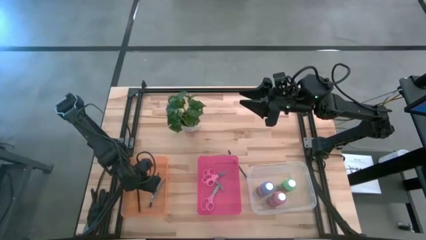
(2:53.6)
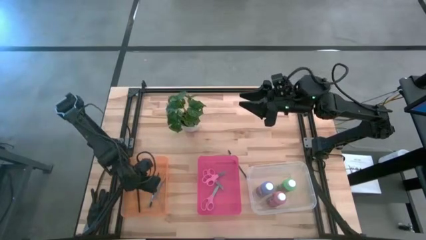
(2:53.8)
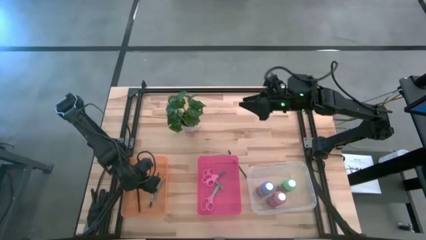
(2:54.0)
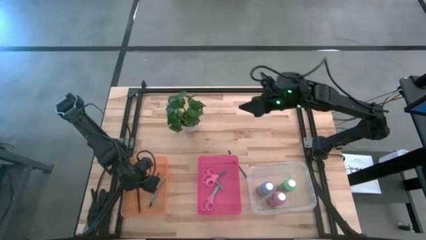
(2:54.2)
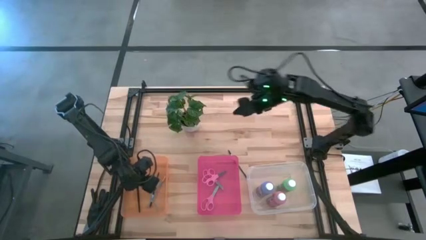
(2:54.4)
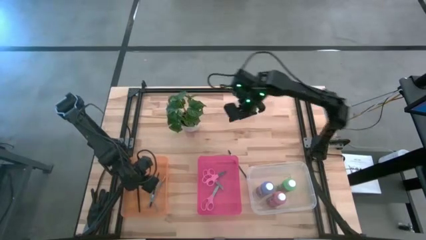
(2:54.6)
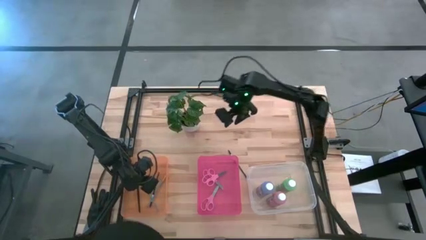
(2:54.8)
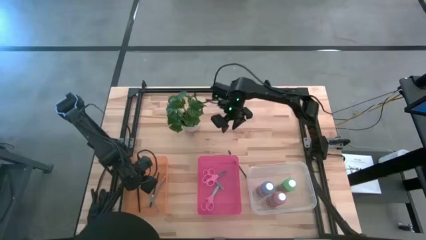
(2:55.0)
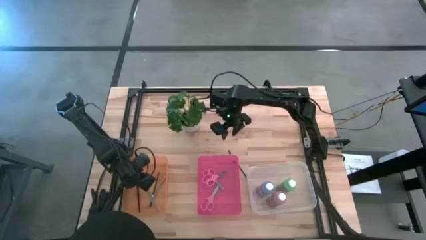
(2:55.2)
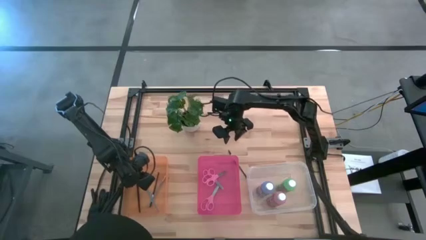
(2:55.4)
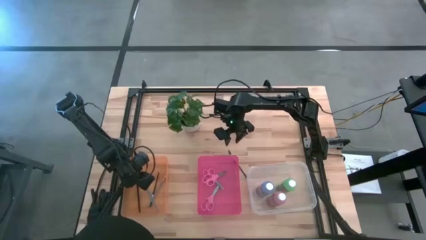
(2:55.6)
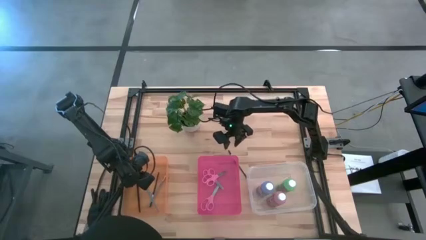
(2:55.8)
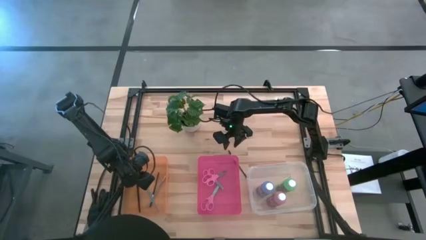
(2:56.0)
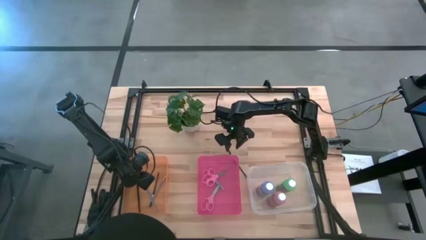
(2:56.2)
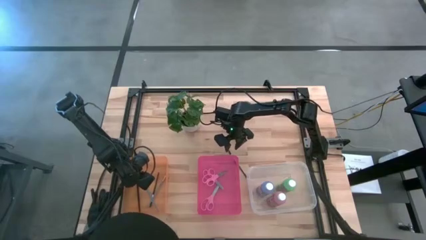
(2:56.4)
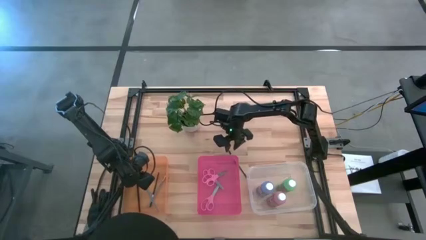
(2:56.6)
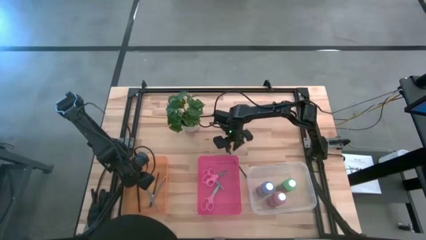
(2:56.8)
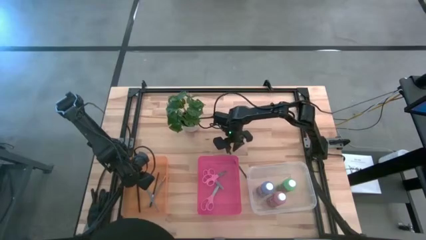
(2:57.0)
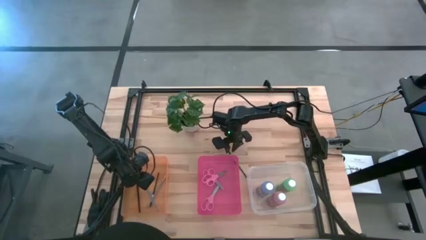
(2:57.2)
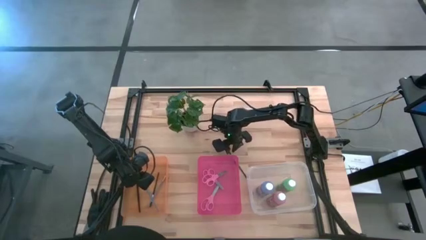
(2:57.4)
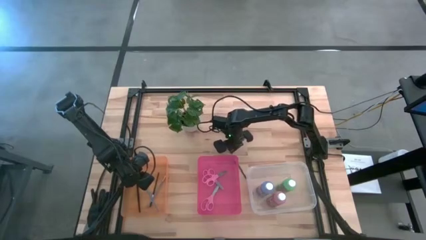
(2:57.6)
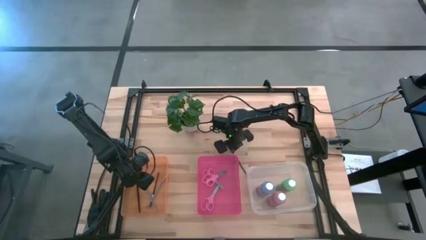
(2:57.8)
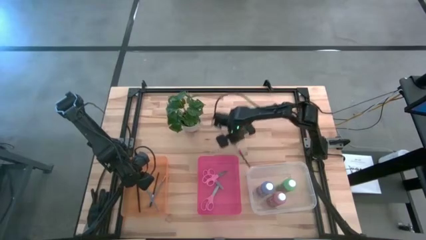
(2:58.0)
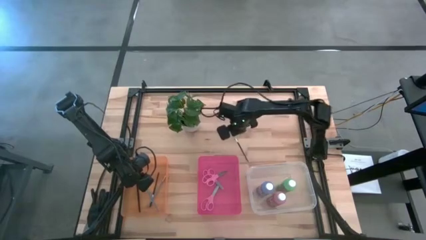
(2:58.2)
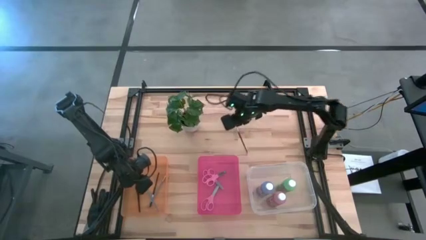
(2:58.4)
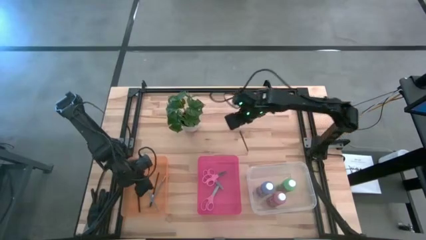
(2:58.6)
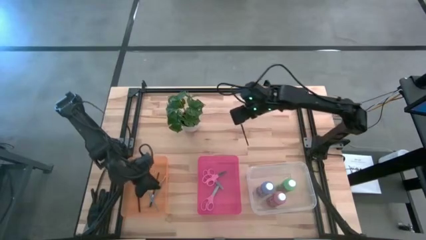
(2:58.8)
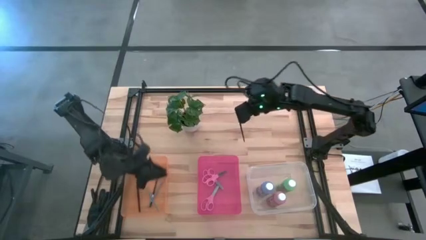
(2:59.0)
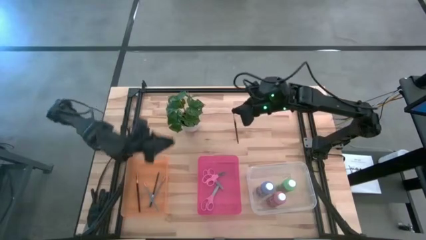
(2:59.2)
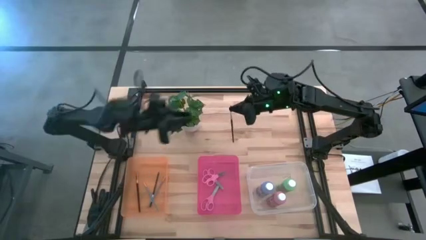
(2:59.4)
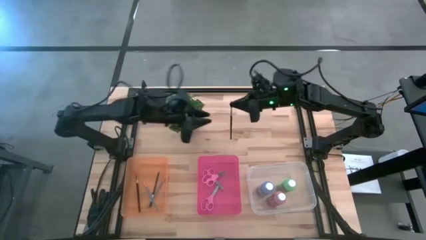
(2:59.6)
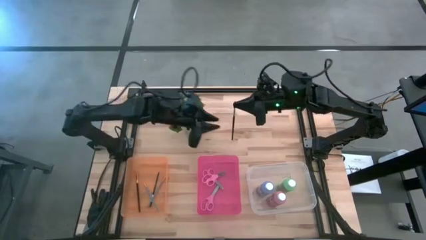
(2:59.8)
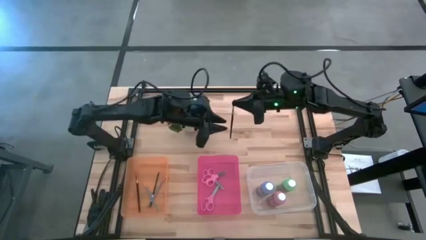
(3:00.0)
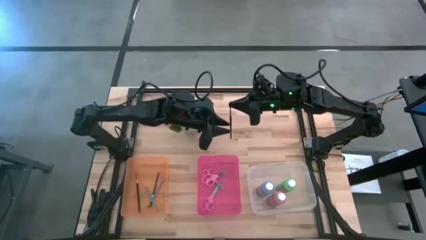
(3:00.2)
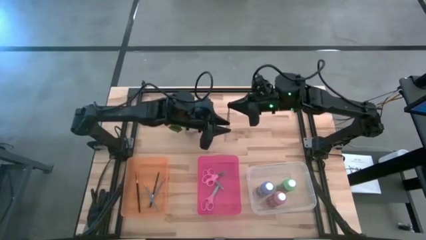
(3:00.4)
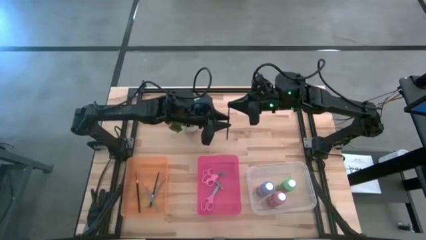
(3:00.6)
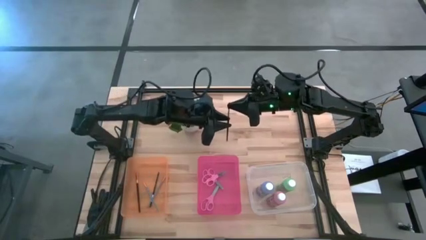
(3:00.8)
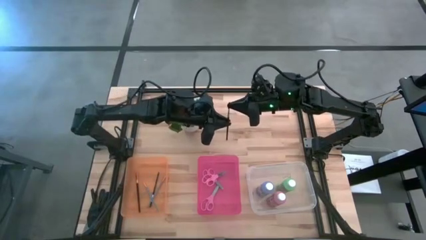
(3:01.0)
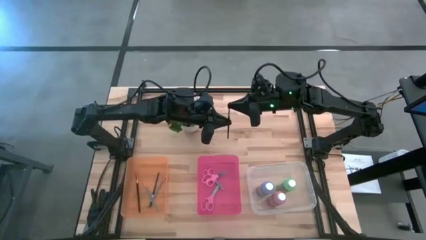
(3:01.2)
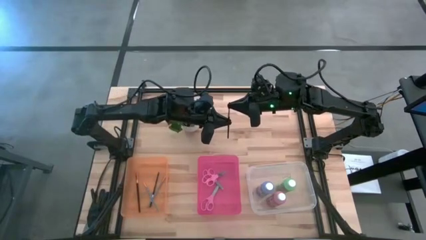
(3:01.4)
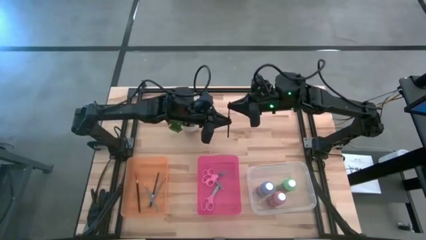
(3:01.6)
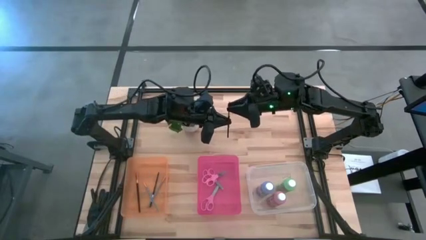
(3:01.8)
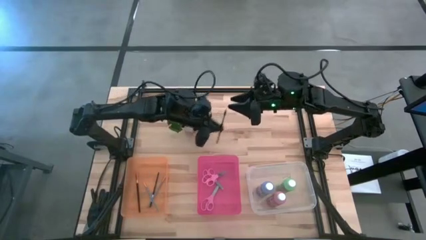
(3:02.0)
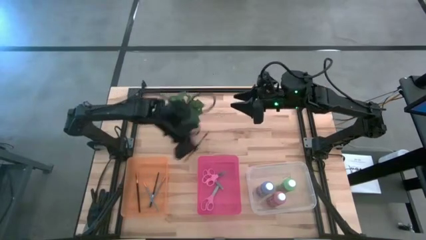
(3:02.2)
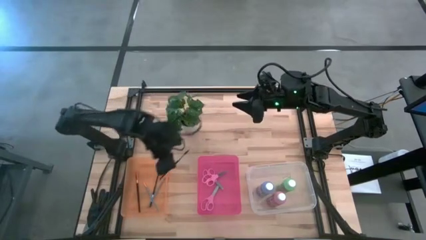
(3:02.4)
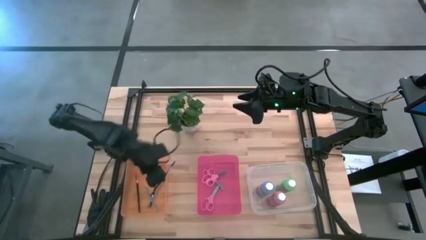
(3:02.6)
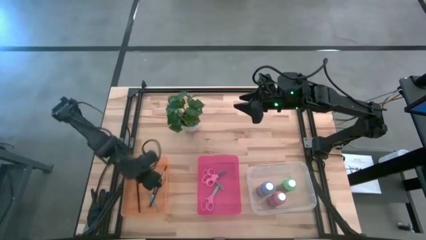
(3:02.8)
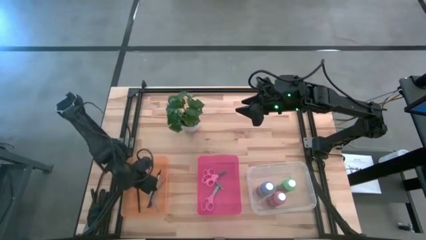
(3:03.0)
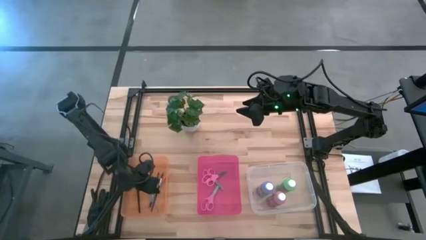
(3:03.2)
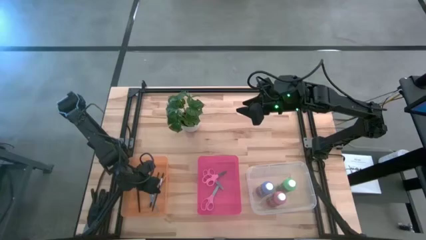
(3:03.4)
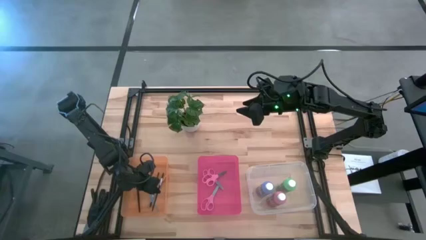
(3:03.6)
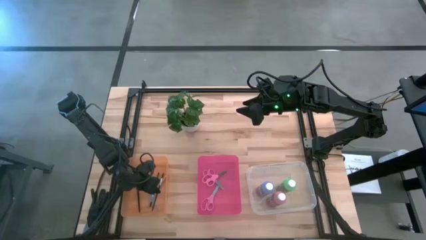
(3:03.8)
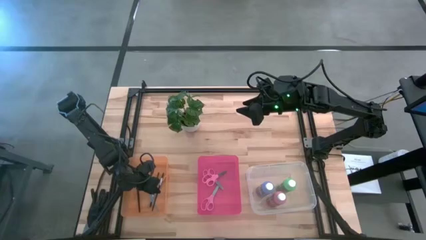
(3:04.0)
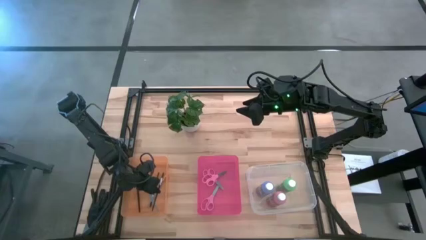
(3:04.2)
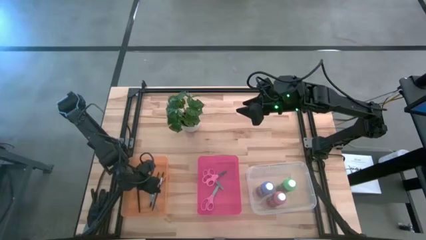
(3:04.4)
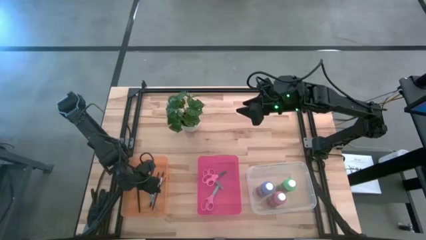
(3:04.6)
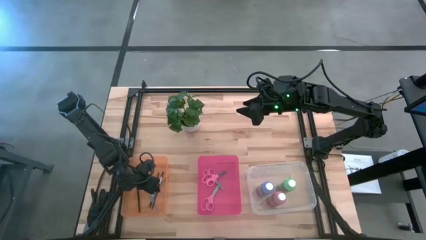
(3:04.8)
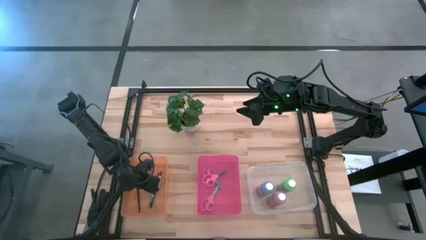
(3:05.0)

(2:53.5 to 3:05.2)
Task: Pick & Place Paint Supplies
Put the black lash brush into the orange bin

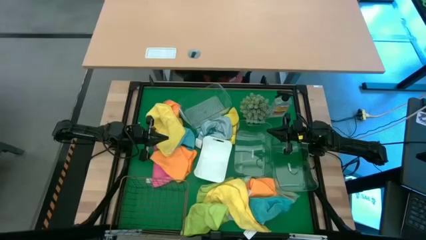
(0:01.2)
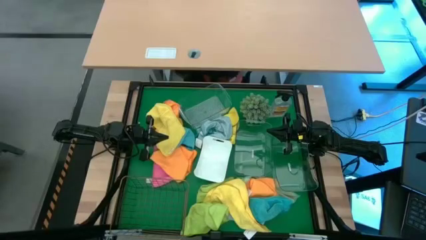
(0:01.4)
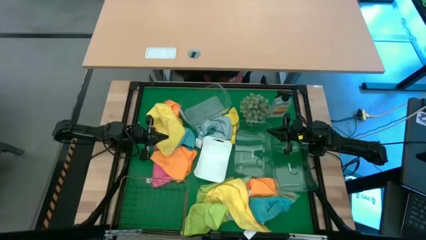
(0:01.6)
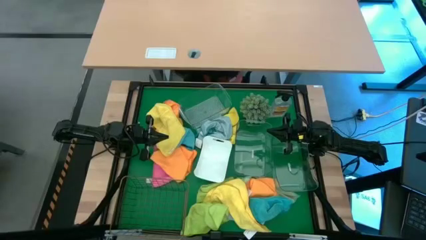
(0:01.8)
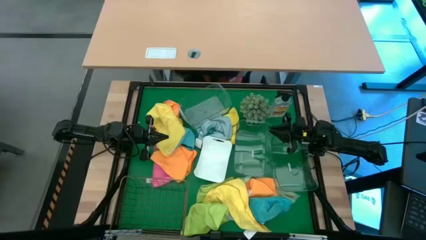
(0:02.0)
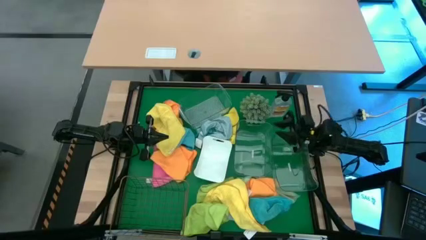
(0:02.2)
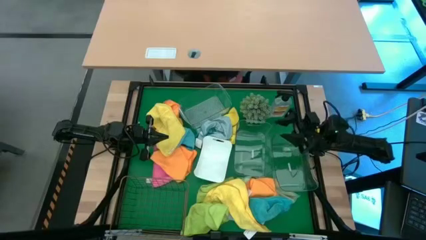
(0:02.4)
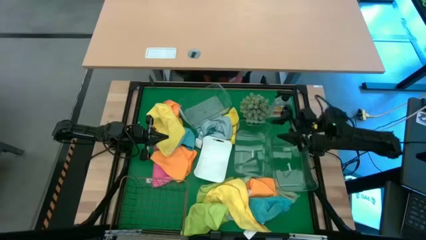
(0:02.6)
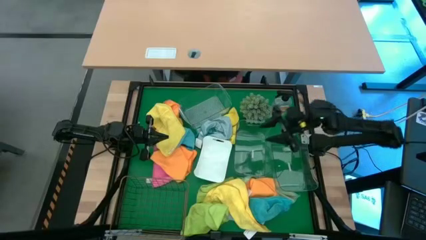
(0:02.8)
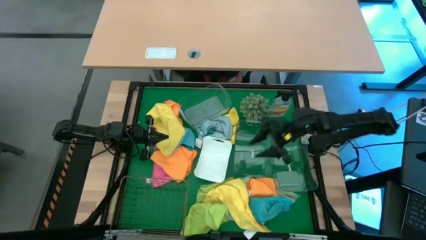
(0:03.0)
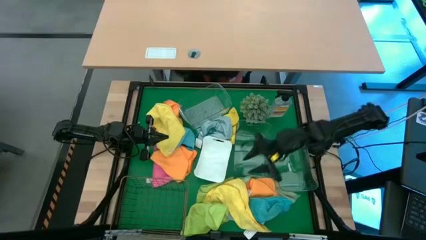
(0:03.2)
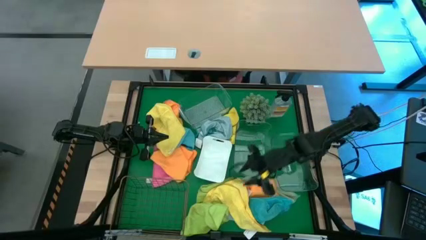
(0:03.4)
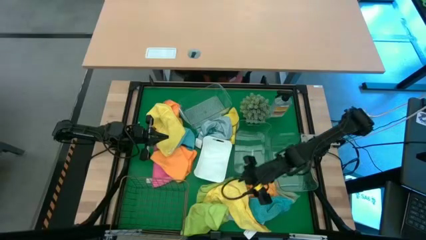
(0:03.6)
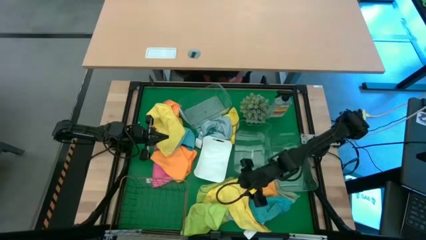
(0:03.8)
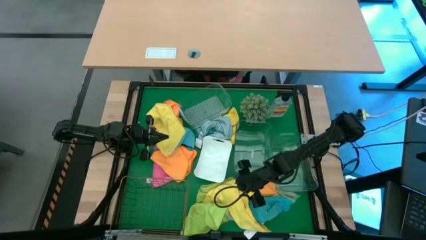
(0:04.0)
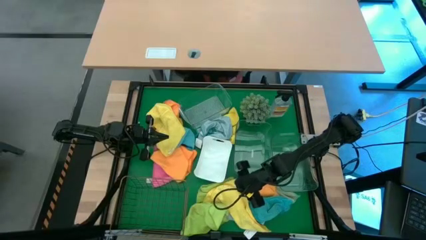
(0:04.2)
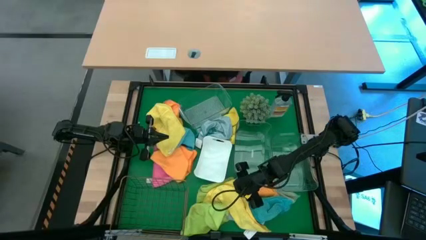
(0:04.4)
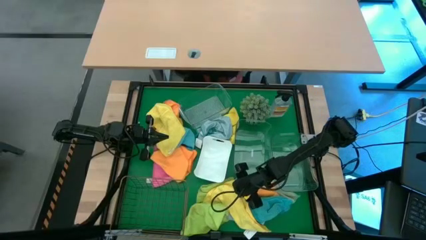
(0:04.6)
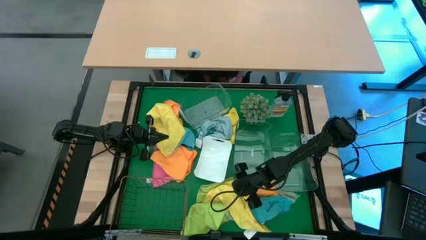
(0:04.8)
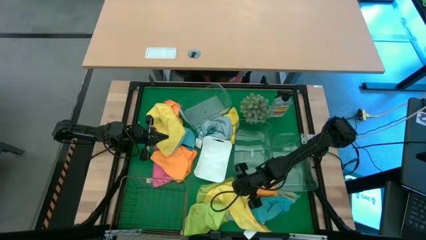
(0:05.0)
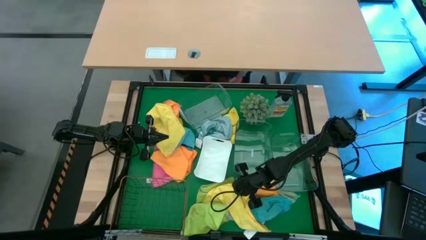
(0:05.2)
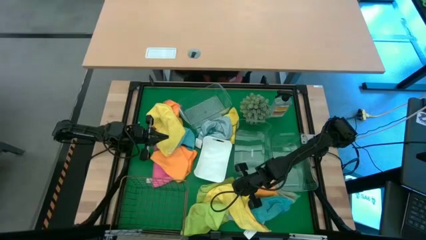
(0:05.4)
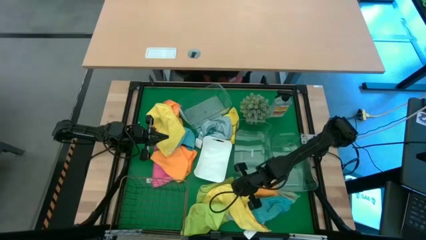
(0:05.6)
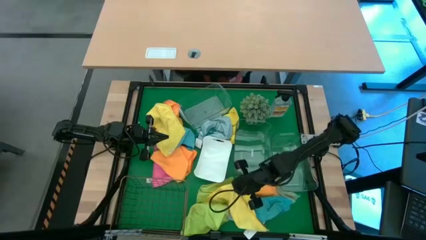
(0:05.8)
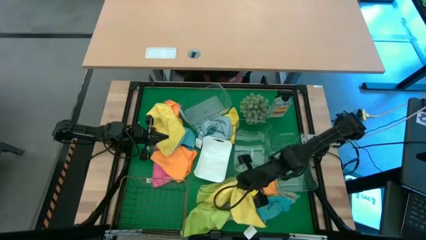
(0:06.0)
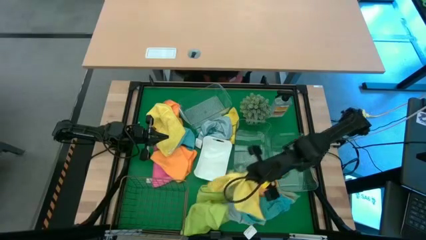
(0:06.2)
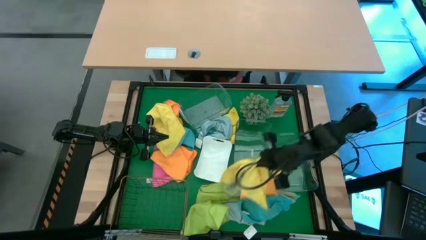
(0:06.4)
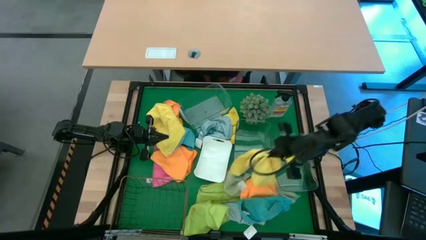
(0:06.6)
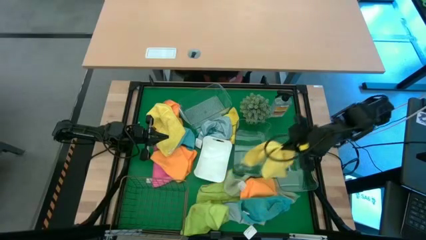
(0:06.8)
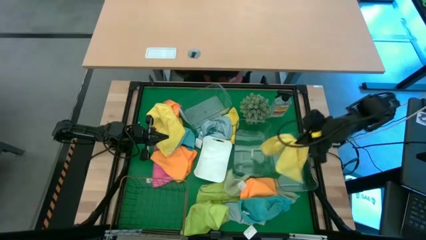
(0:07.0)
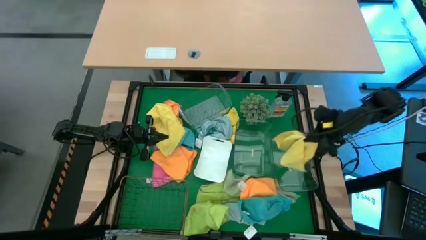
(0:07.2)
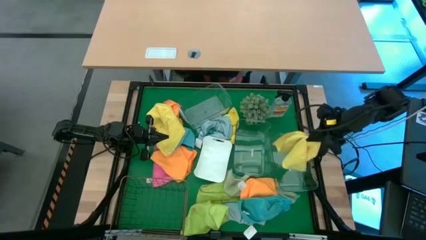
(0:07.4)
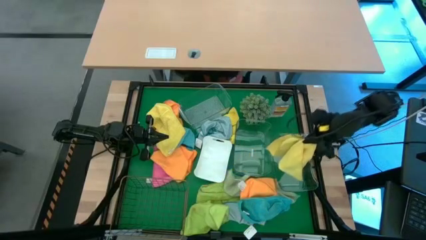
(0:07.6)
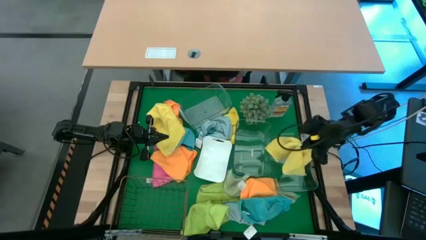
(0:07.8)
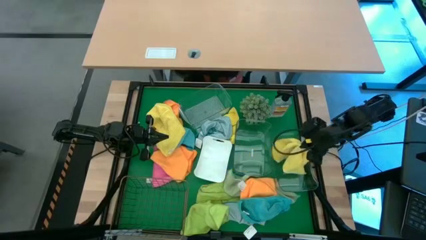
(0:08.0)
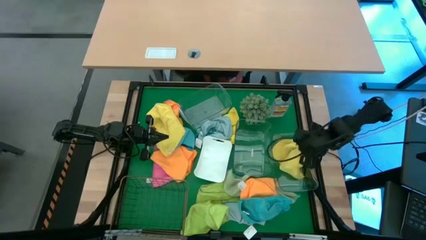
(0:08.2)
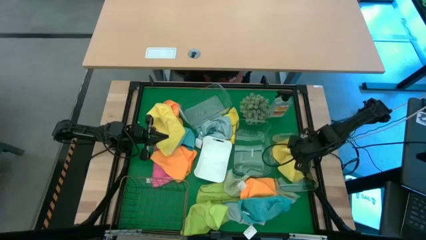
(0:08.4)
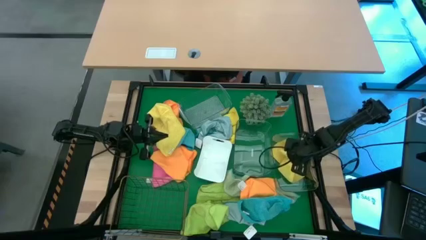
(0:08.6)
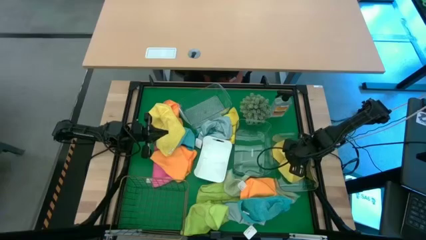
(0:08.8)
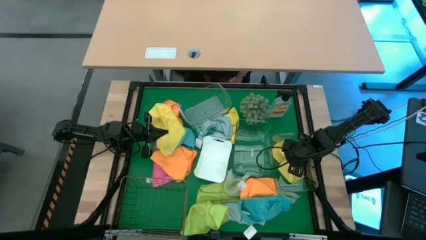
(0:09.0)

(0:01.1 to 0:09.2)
Task: Sort microfiber towel by color & place in baskets
Put the yellow microfiber towel into the right transparent bin
